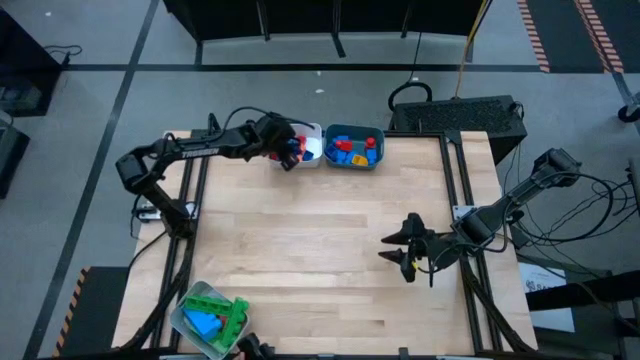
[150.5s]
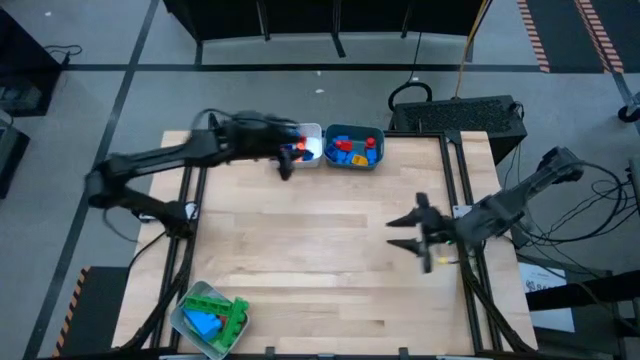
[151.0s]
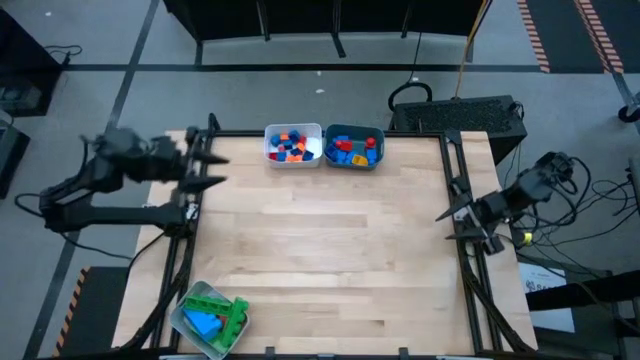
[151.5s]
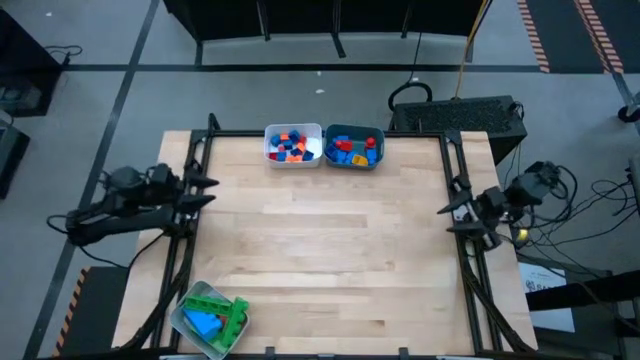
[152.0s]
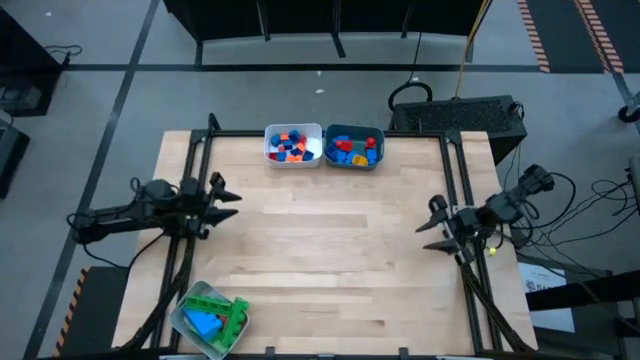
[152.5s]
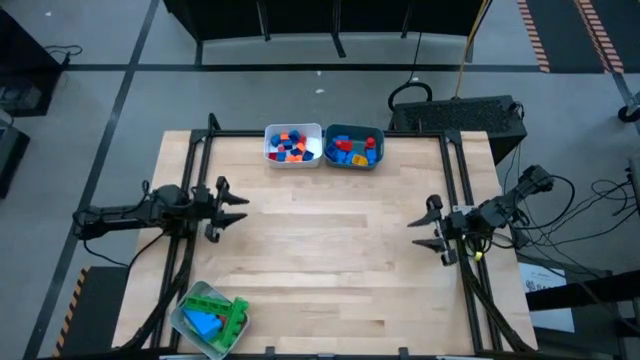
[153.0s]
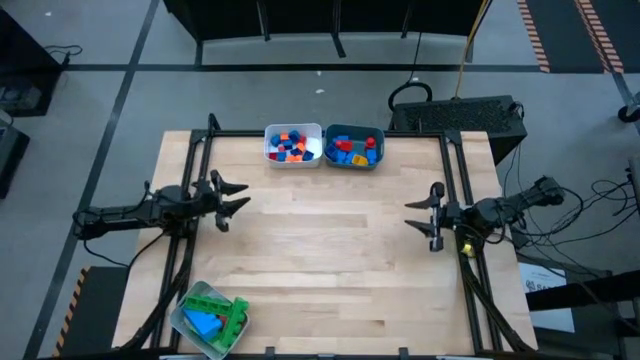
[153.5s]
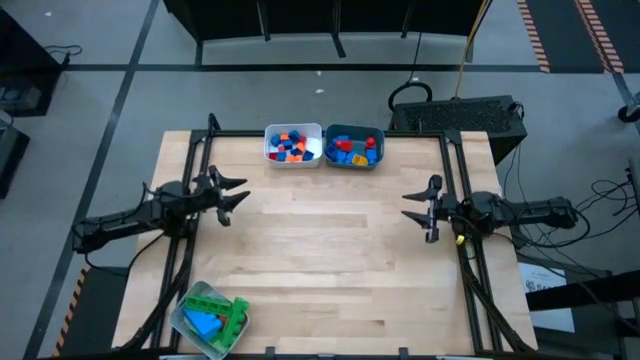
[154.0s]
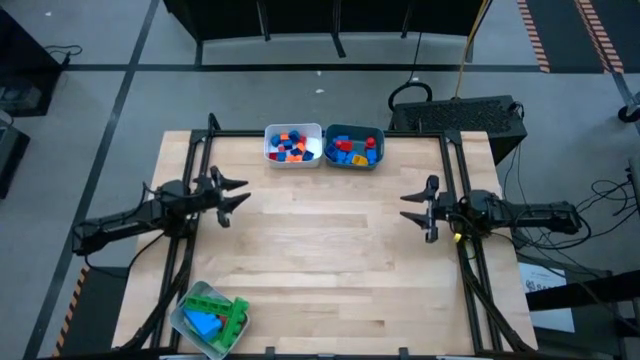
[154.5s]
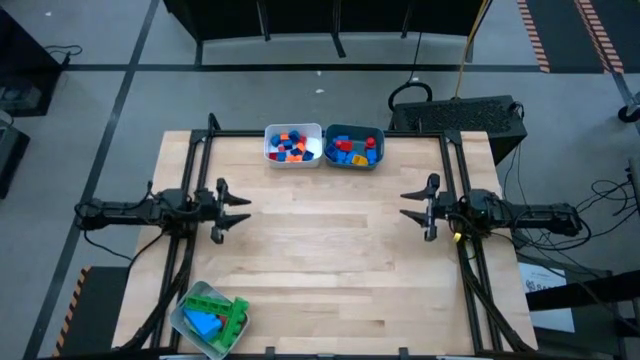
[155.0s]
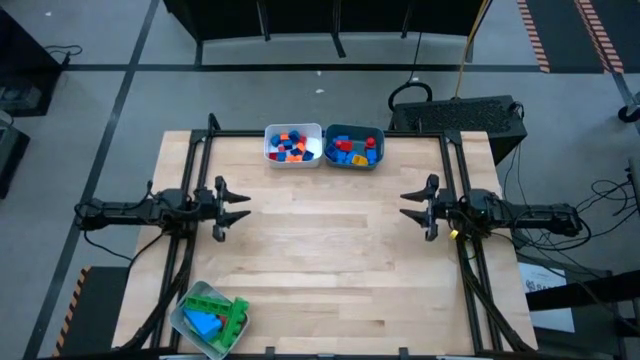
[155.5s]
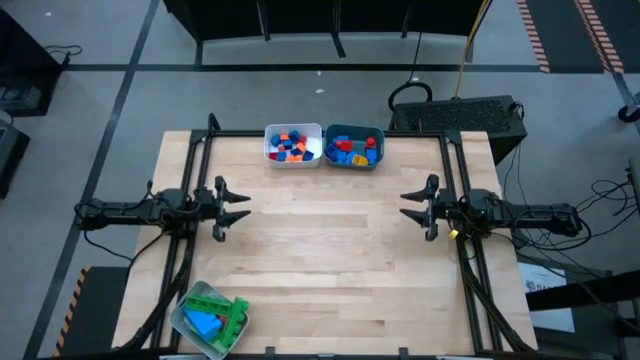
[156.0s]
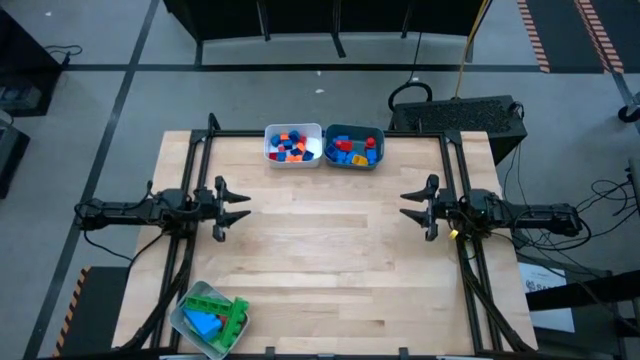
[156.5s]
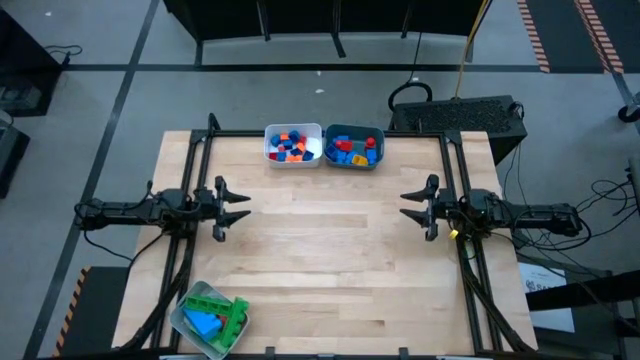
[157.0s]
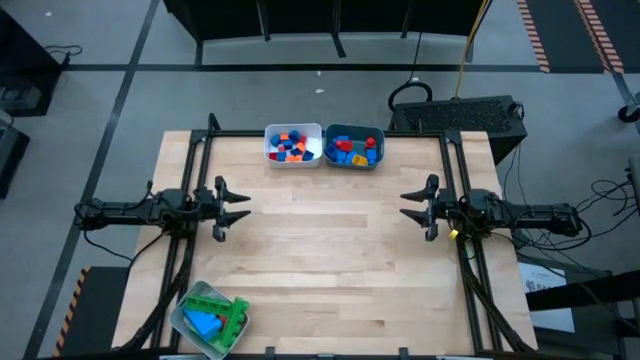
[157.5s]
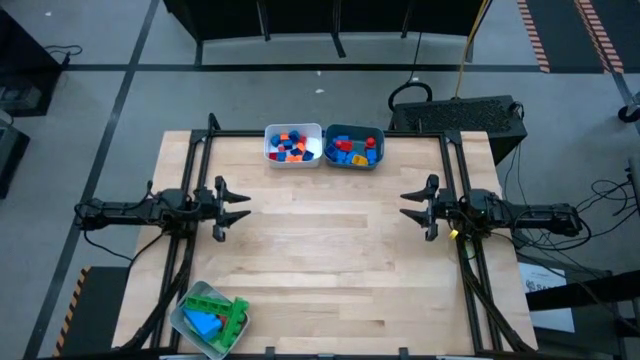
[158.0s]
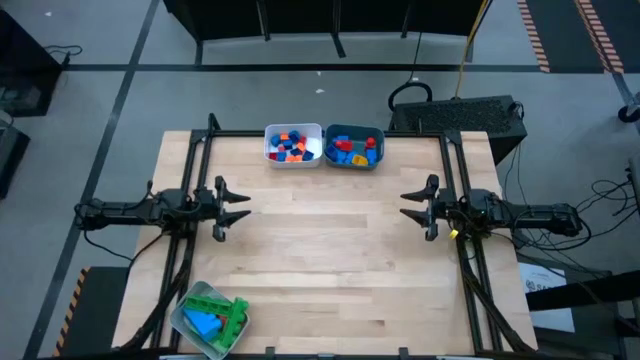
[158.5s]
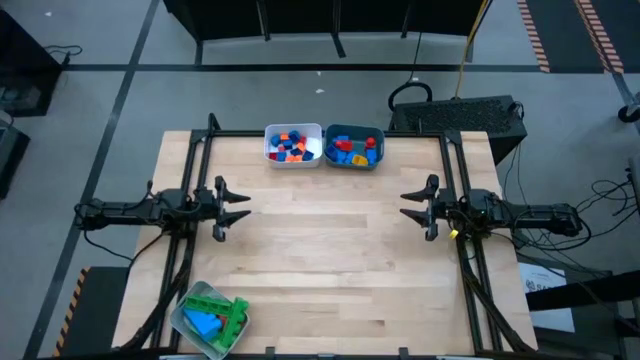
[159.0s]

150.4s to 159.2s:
Task: Sort blocks by size
Return to Home Position

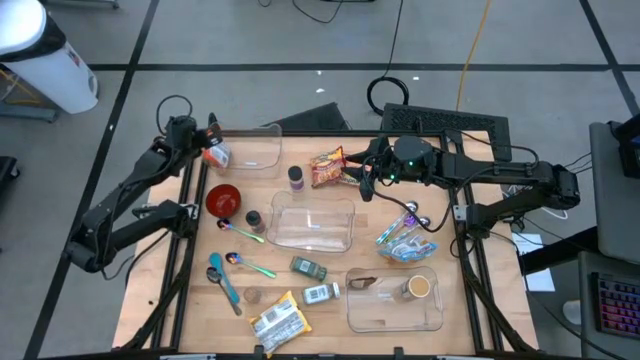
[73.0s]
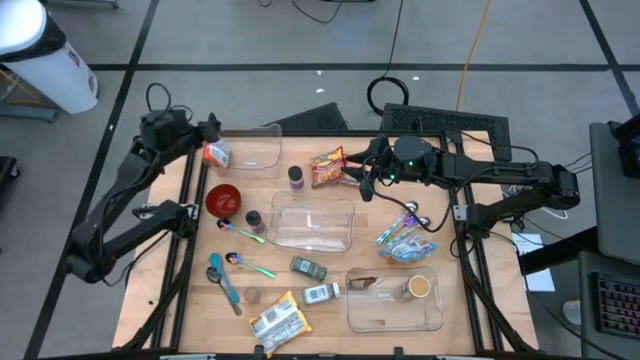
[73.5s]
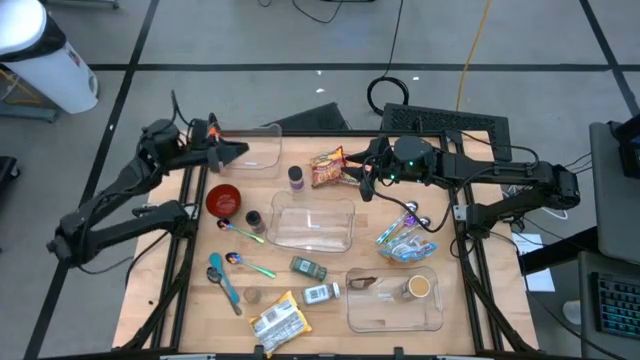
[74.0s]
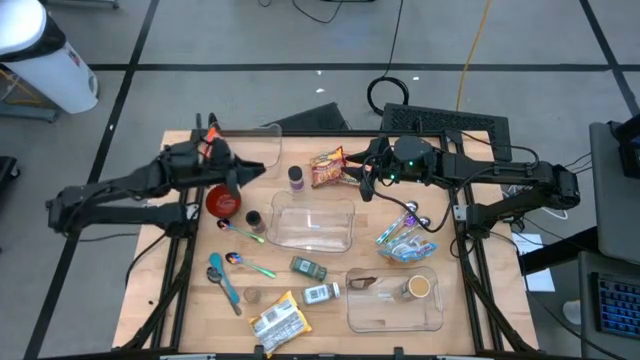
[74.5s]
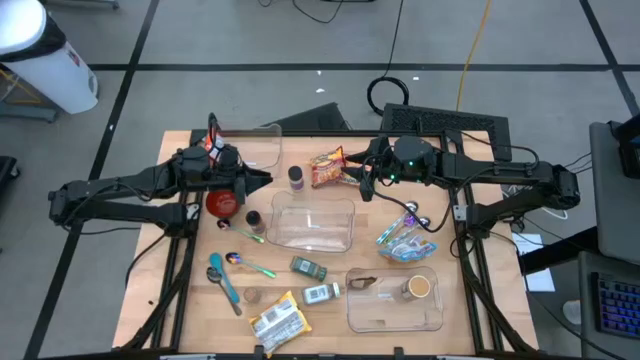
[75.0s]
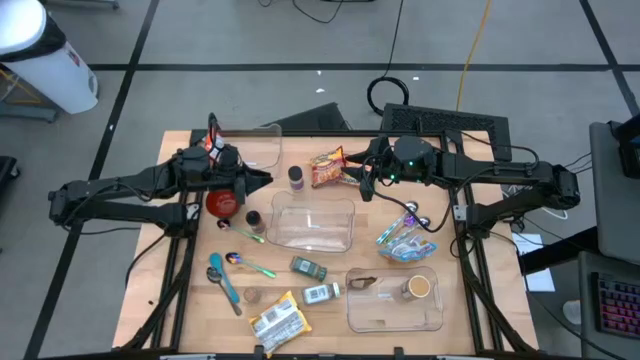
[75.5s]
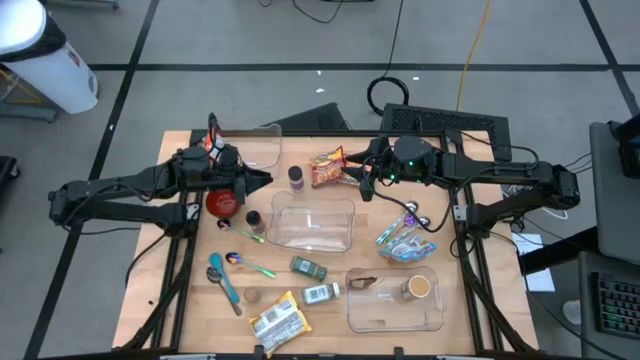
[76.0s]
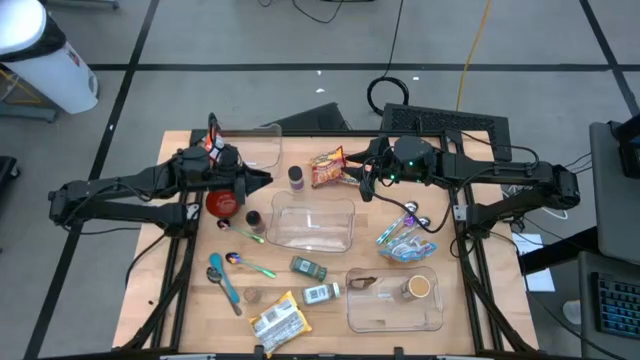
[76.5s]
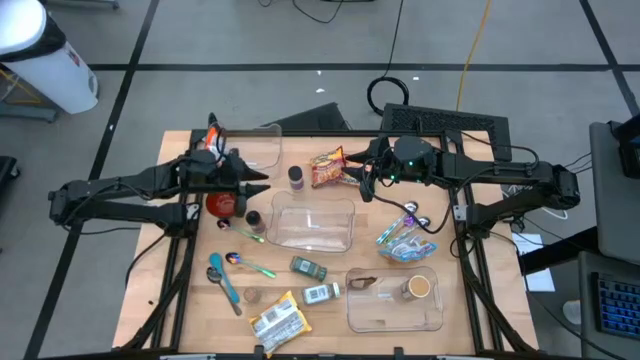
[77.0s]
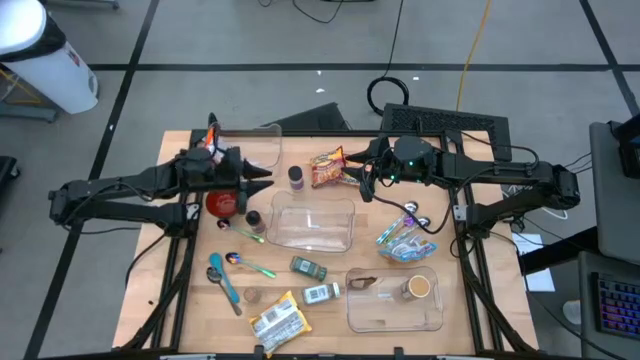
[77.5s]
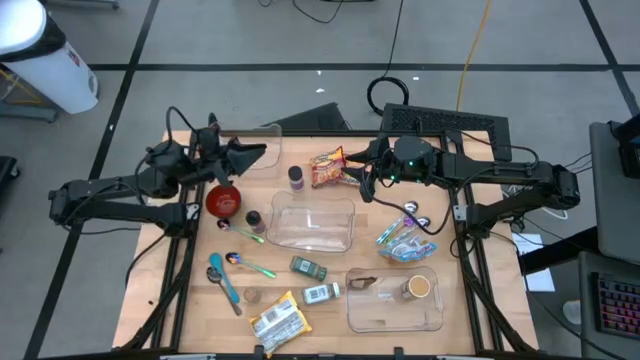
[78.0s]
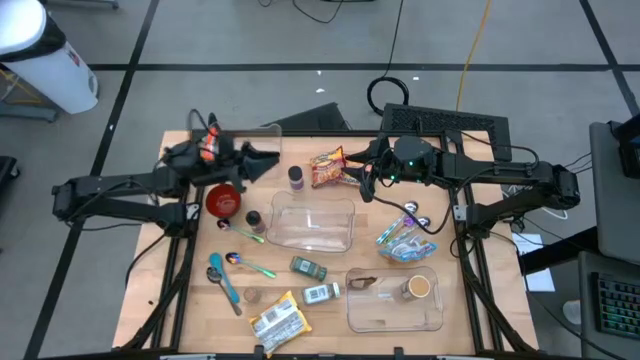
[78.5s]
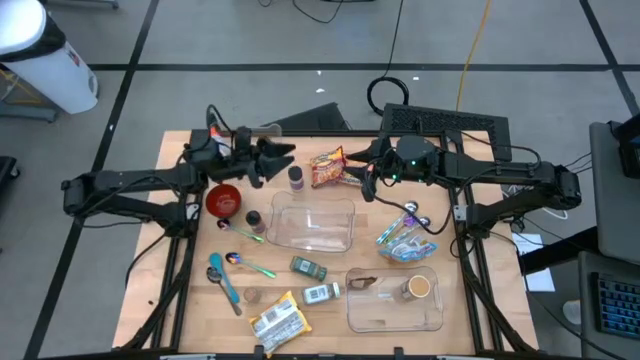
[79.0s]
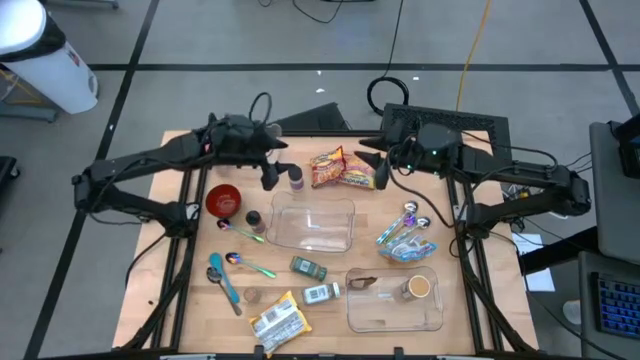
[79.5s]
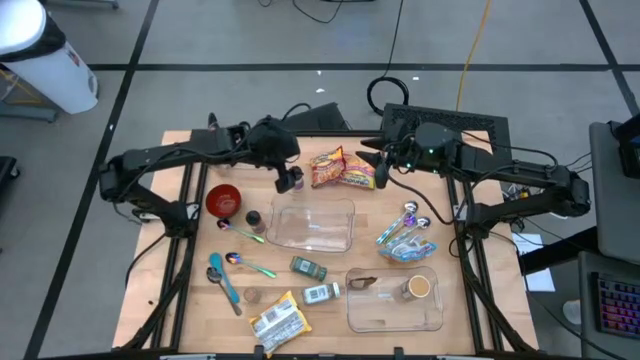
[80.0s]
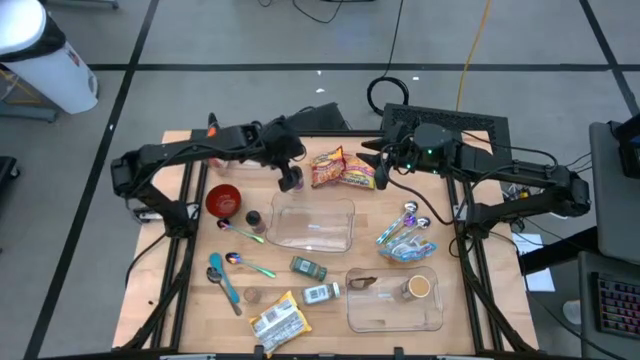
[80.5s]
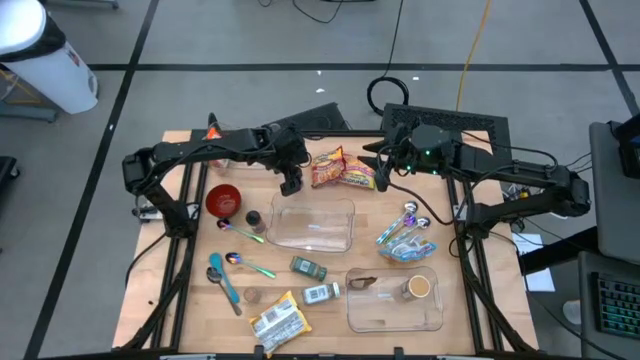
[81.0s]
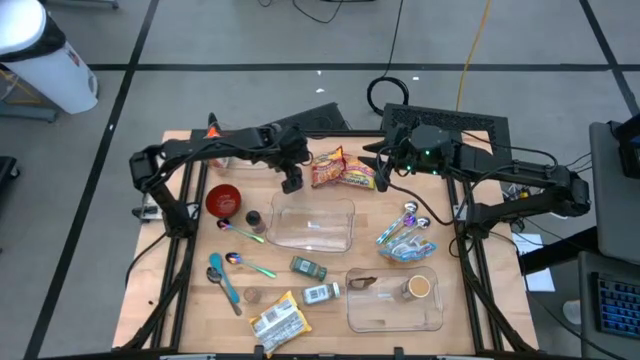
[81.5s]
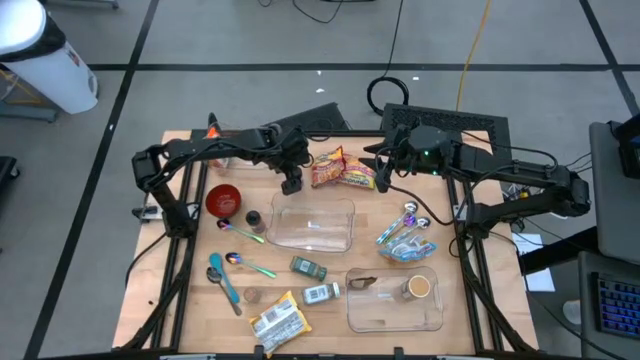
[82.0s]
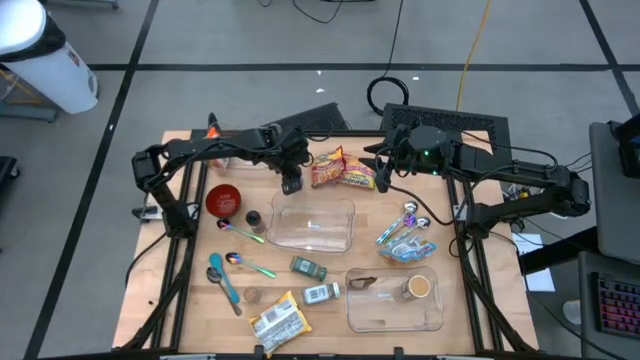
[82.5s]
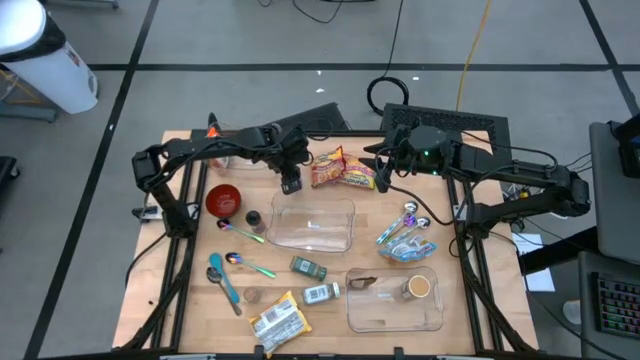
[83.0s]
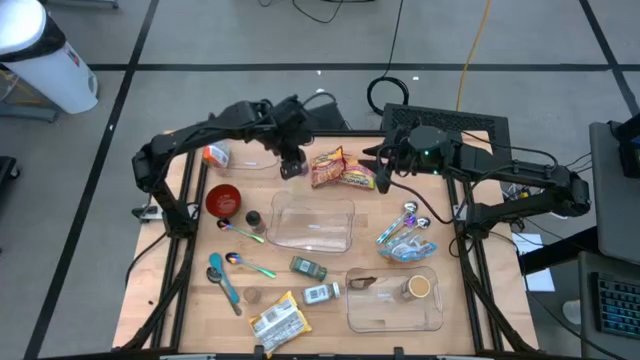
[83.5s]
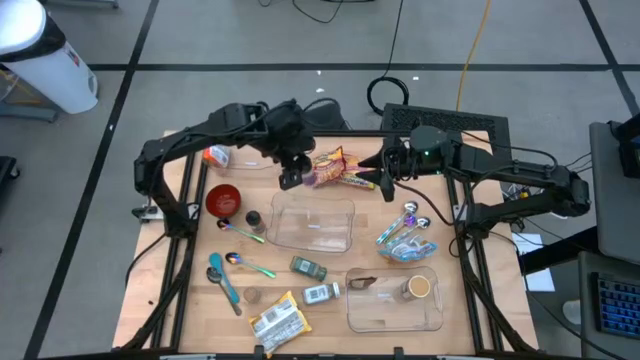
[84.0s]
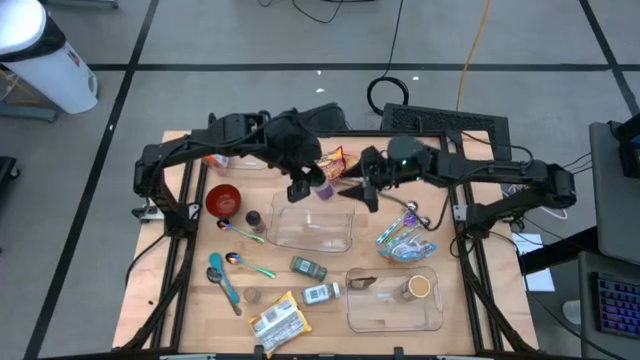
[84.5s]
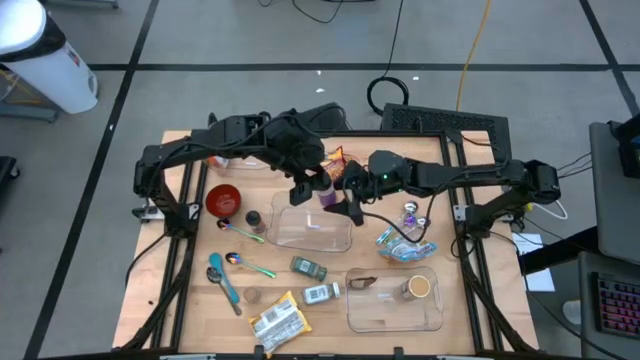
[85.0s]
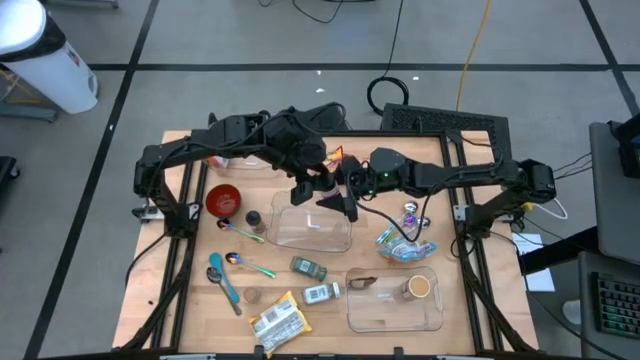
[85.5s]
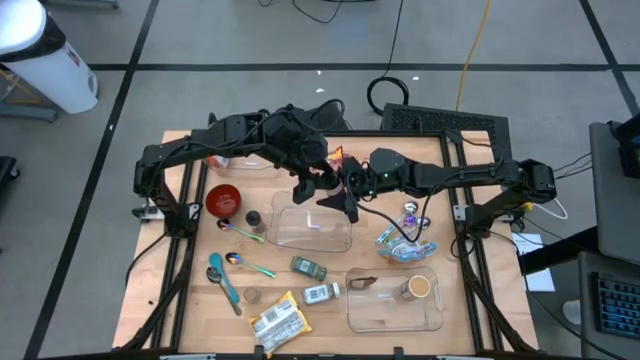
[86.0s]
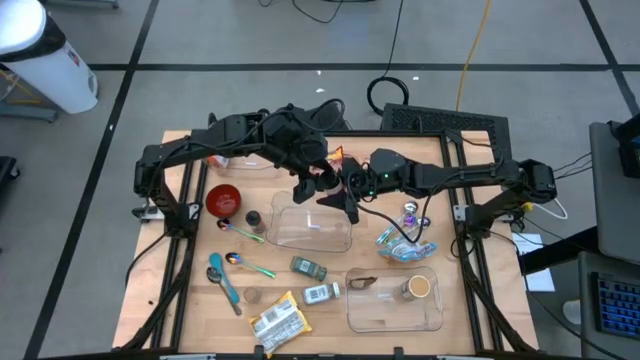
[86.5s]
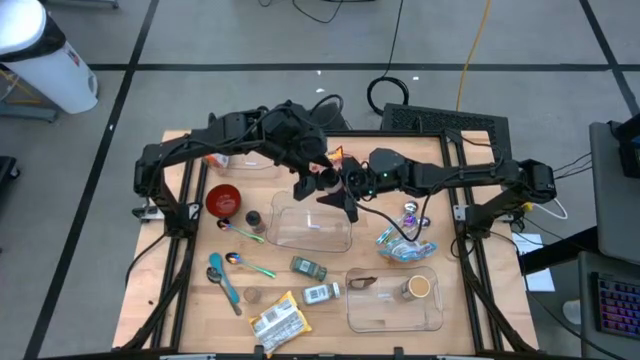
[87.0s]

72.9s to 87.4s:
Task: Pick & Place Food Item
Put the purple seasoning bottle into the bottom transparent bin
